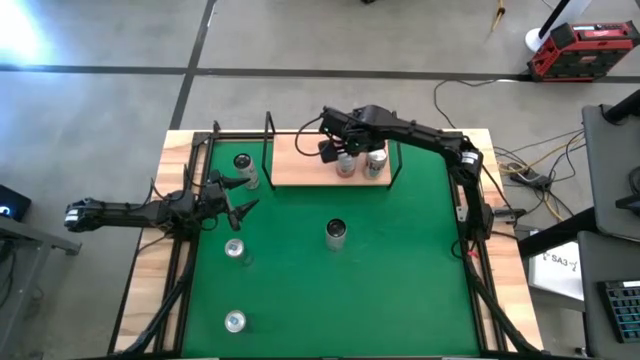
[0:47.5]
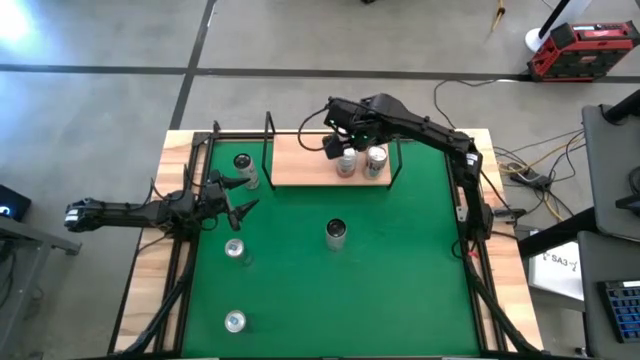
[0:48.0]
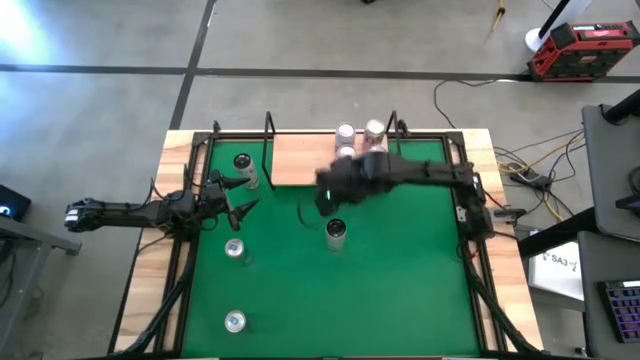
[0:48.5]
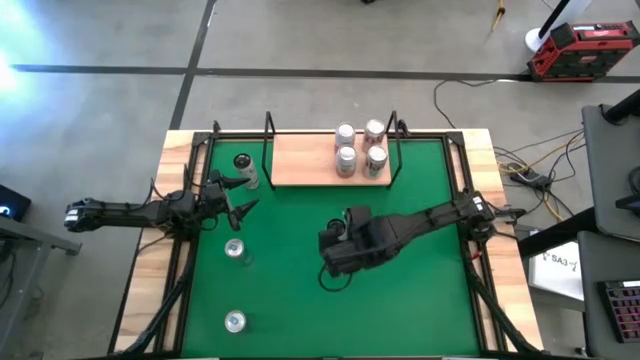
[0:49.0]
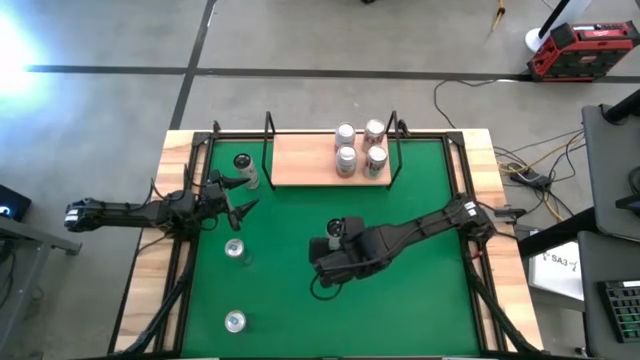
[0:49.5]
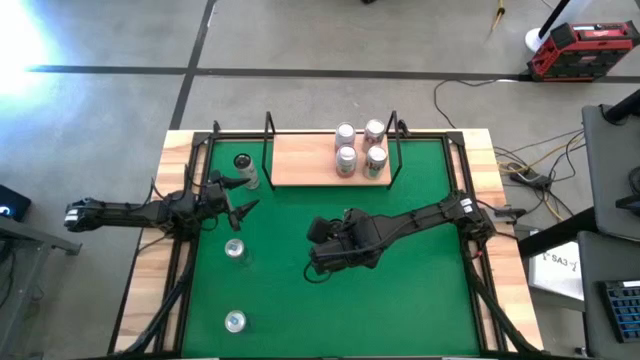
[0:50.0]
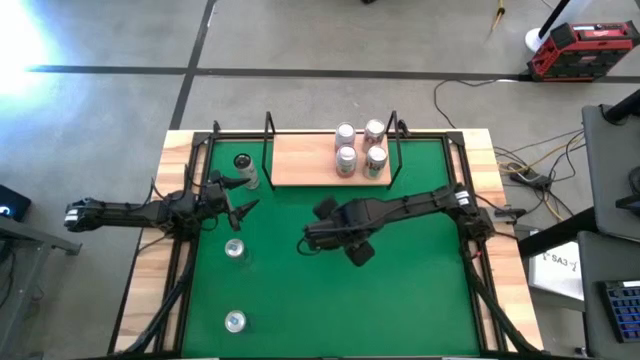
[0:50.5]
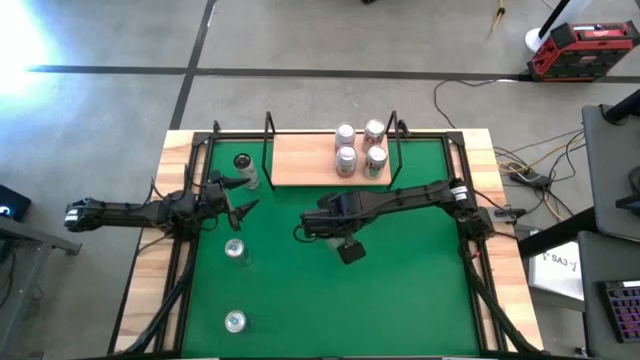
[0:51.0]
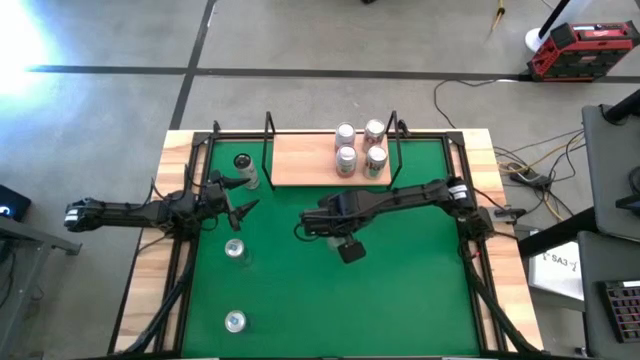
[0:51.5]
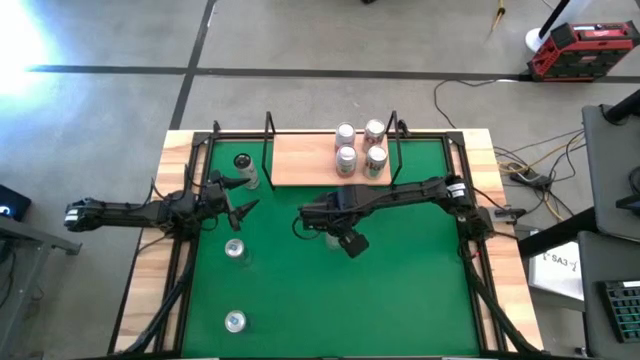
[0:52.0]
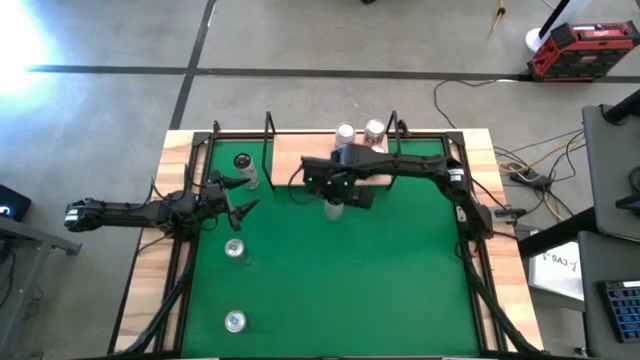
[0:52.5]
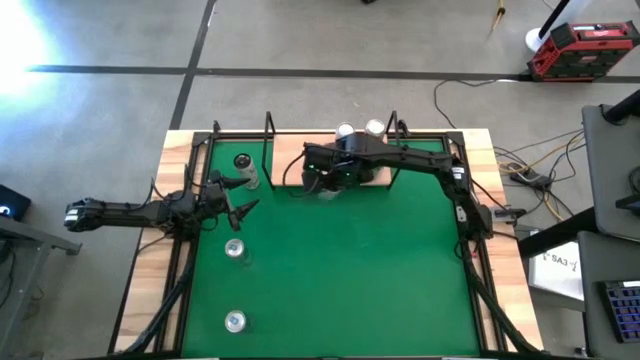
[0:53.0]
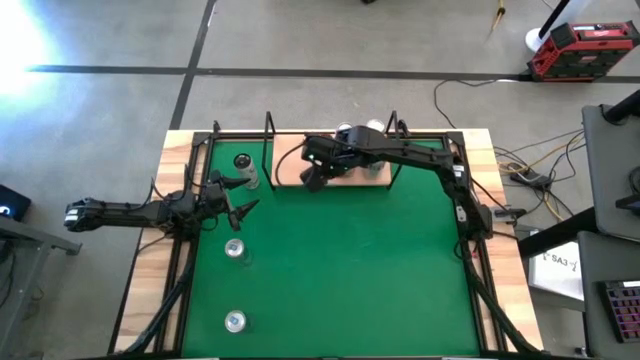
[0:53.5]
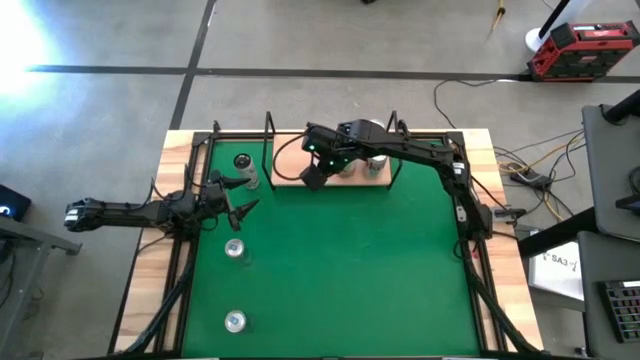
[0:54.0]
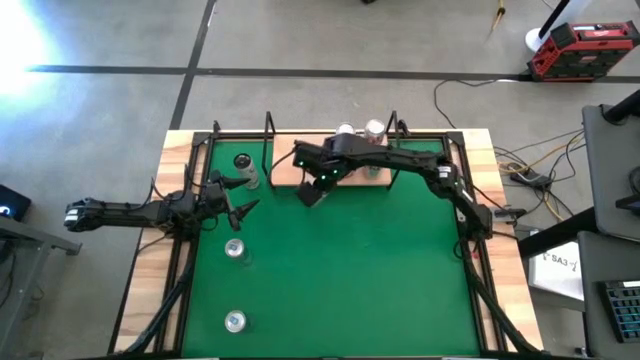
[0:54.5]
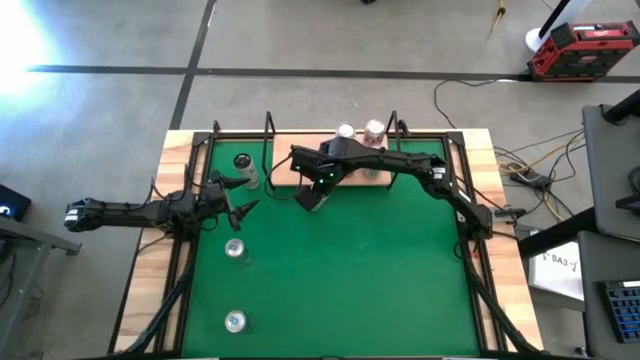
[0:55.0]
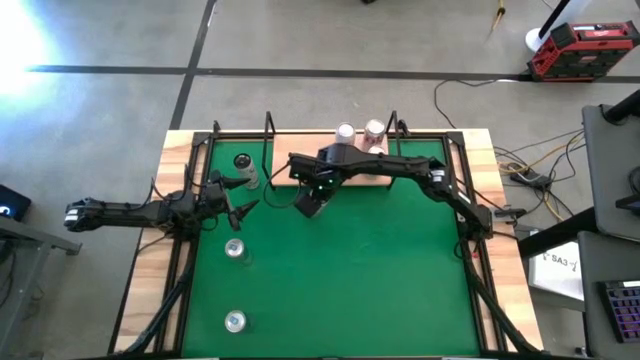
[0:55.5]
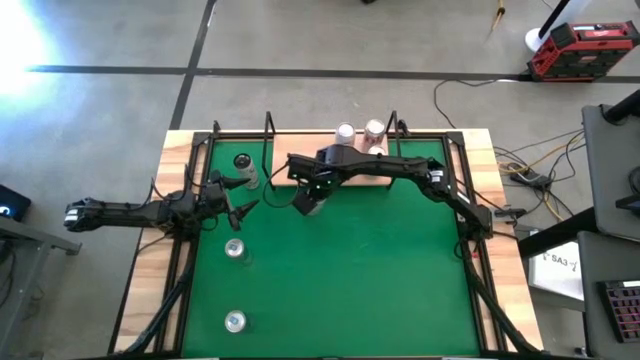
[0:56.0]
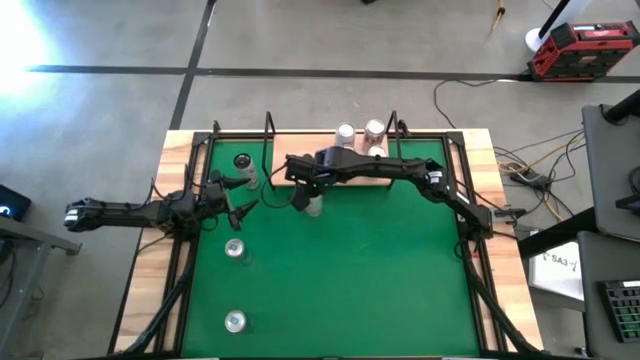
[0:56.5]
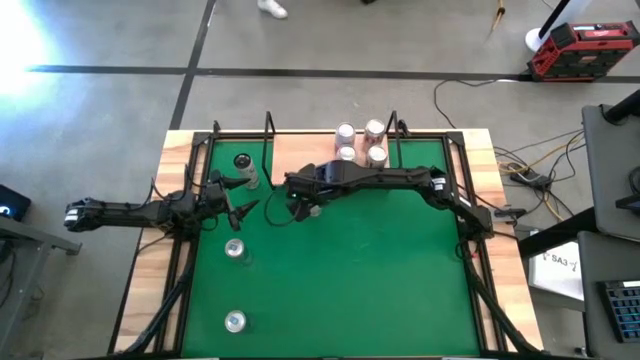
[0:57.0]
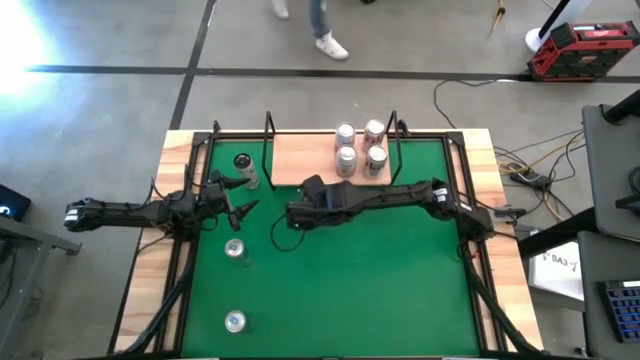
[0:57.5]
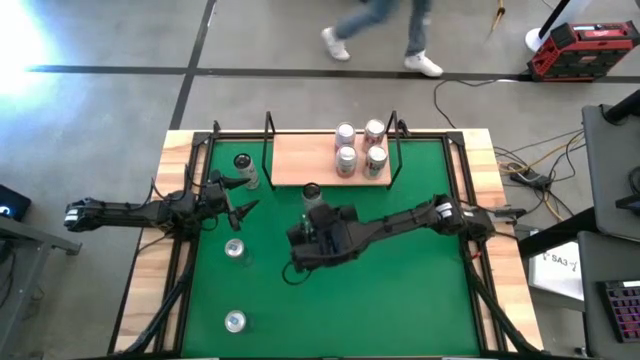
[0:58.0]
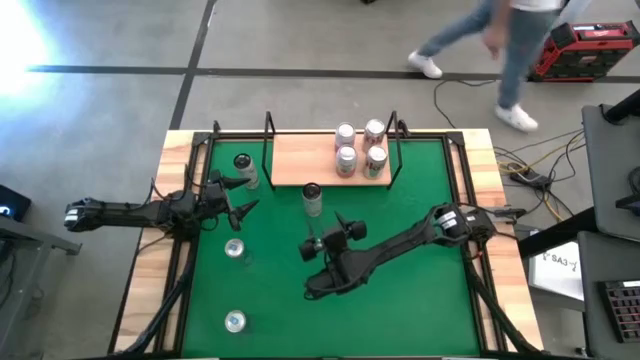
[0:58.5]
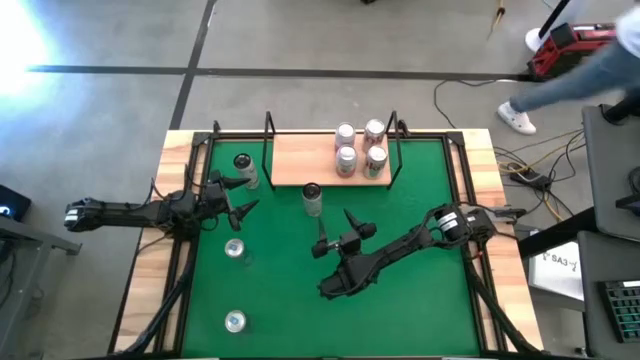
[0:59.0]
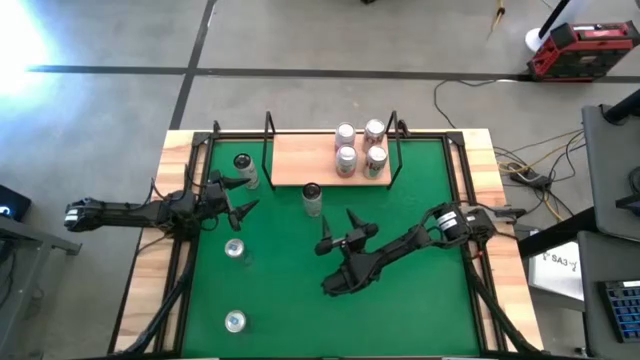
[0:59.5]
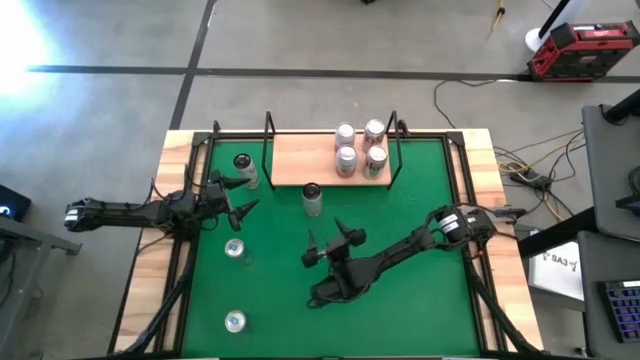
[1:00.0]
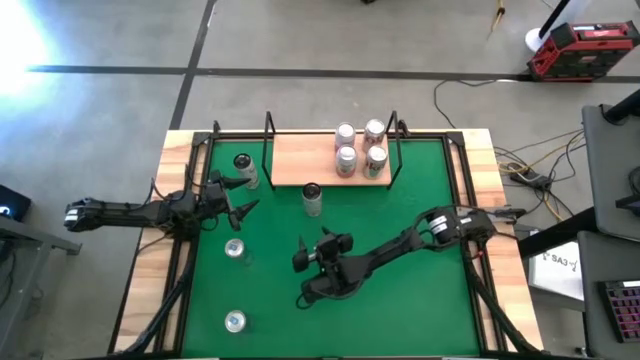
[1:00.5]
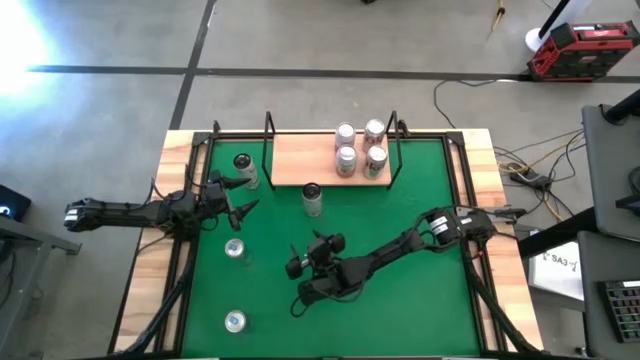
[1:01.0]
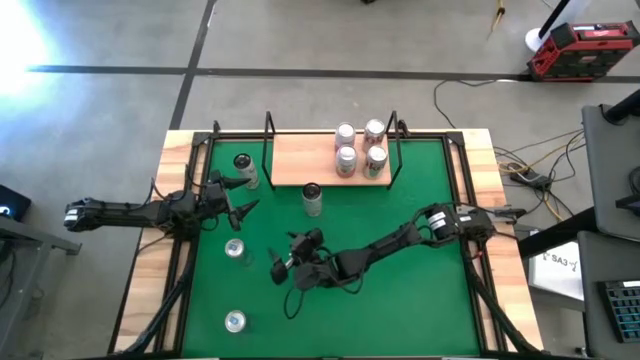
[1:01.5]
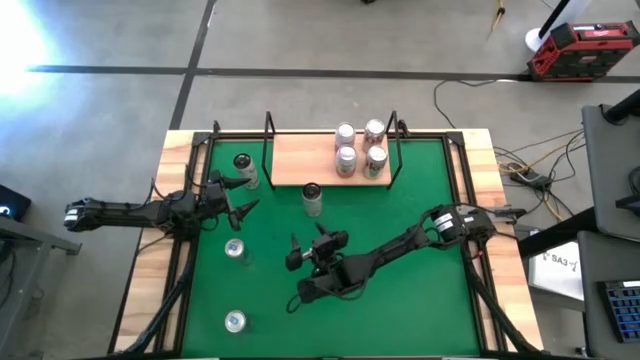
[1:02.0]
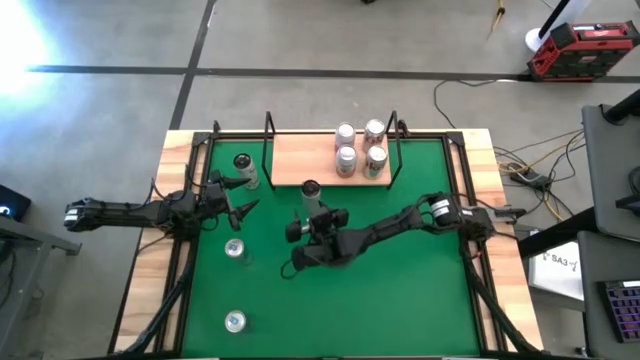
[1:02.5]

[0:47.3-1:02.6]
Task: Place canned beverage on shelf
Put the right black and white soda can on the shelf

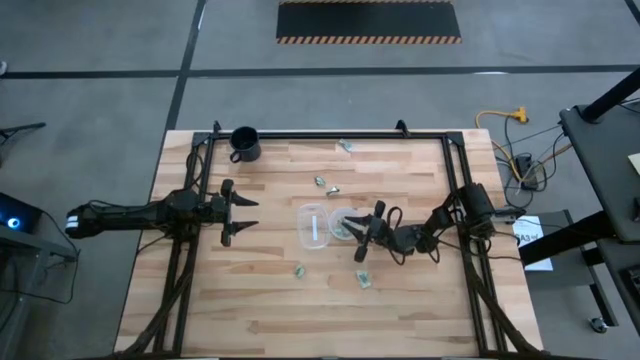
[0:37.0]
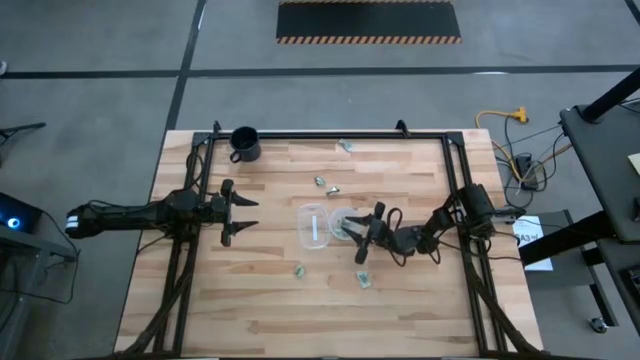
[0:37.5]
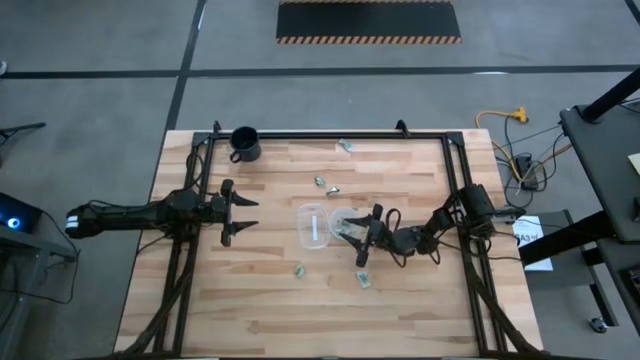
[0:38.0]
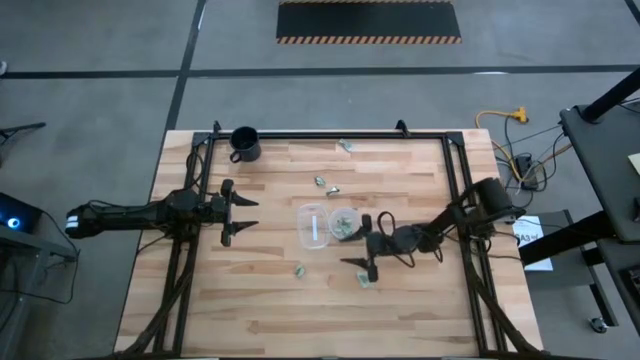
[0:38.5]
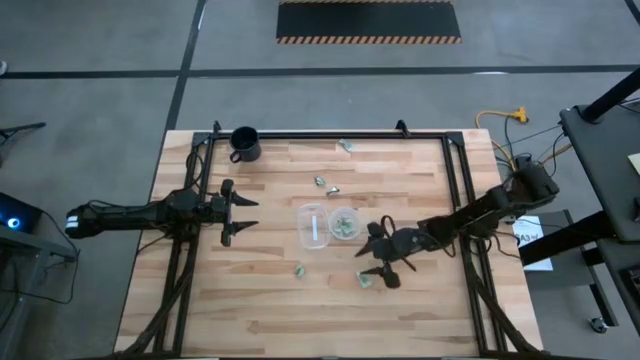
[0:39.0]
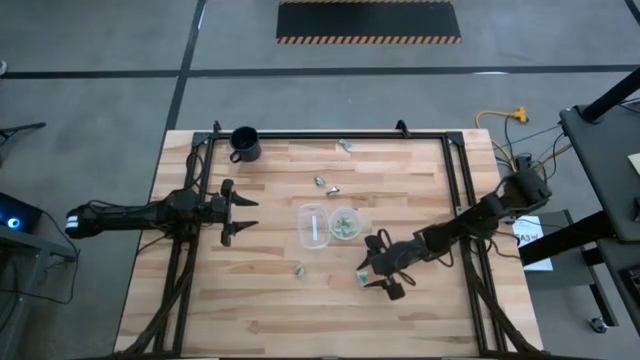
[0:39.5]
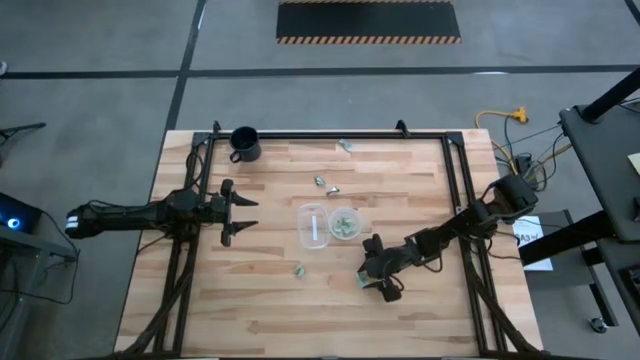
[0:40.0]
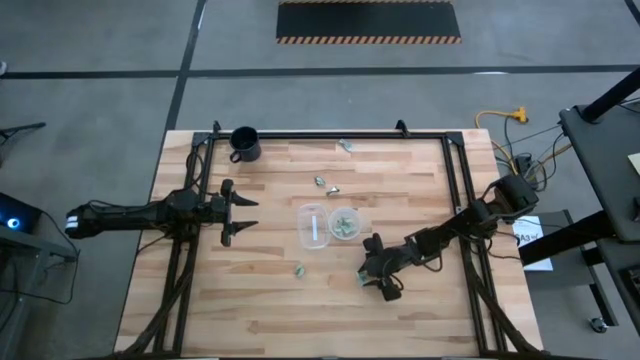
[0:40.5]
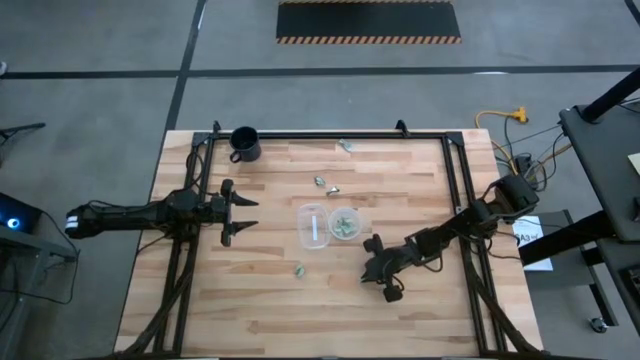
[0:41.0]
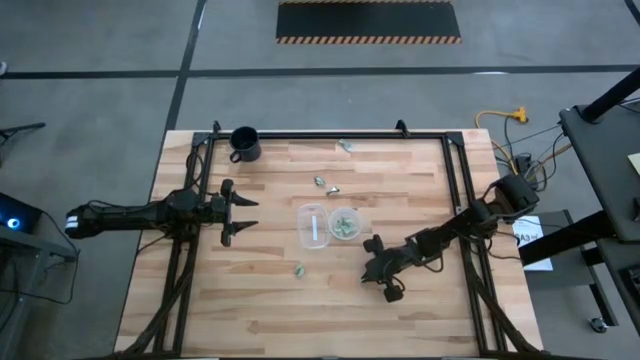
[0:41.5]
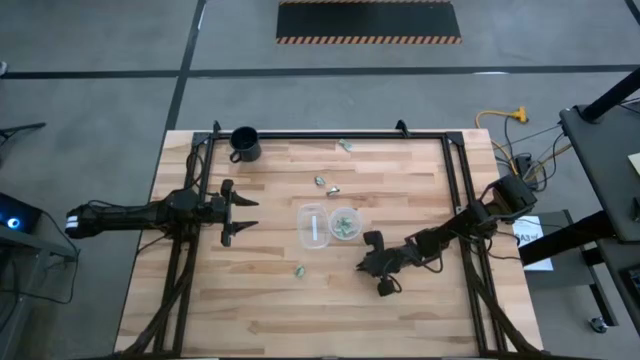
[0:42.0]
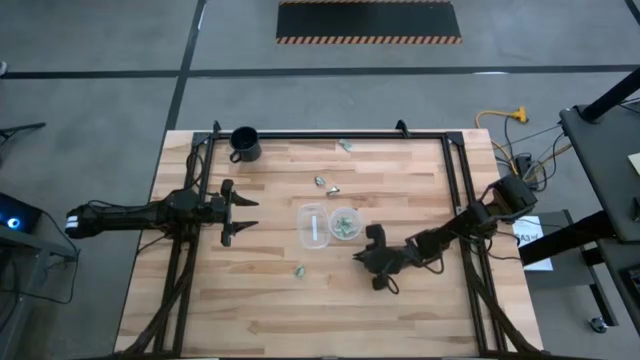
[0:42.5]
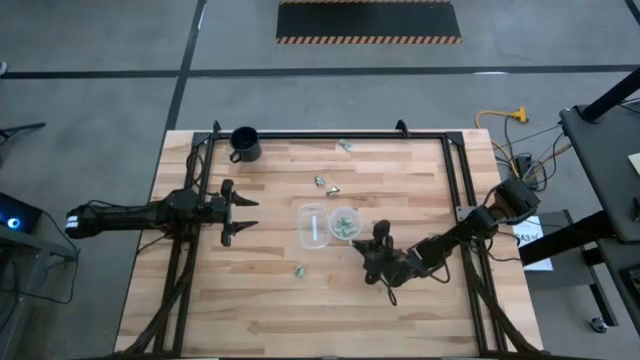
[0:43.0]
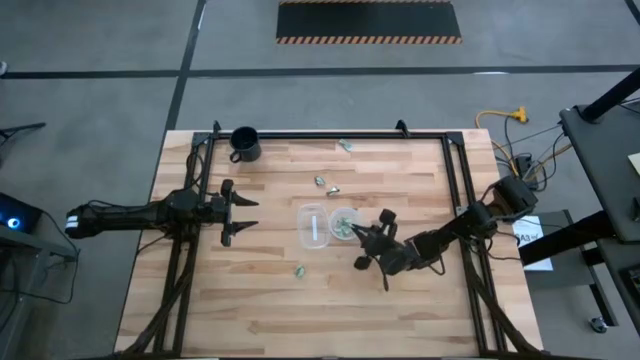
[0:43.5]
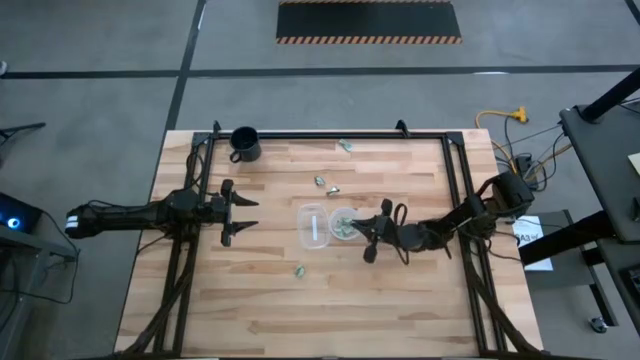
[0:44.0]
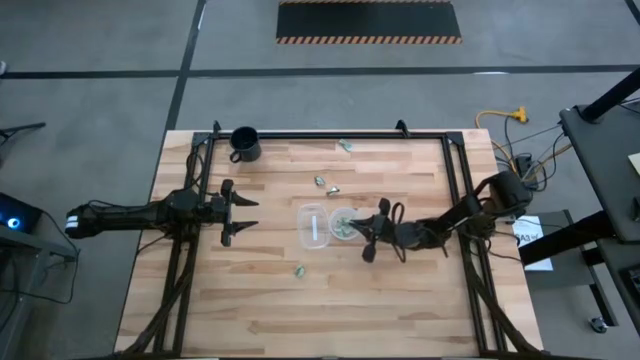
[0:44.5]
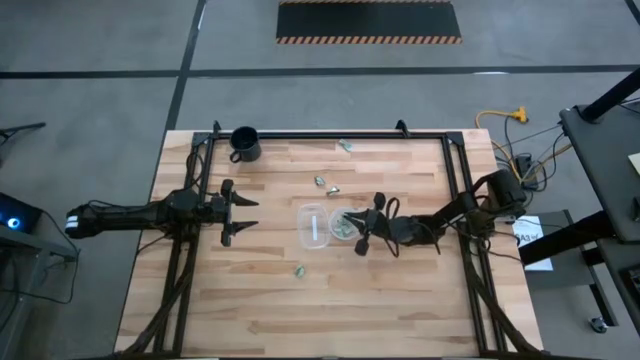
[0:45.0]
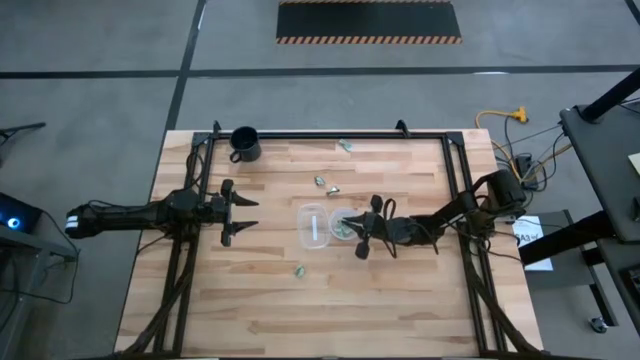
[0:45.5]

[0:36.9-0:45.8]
Task: Pick and place Stevia / Truvia into bins
Put the green stevia packet into the right transparent container
